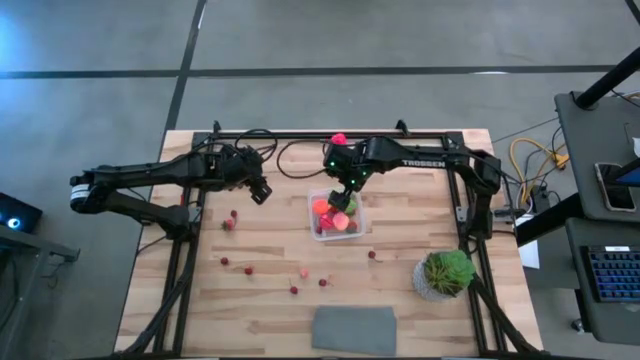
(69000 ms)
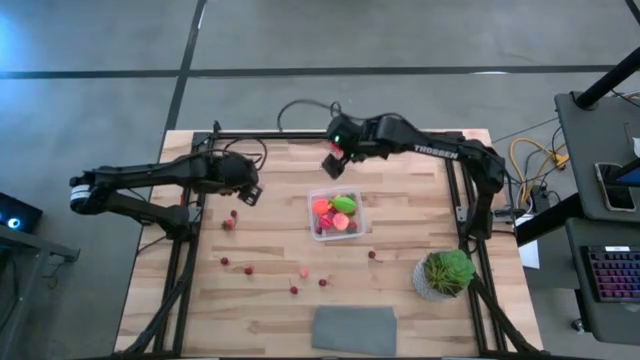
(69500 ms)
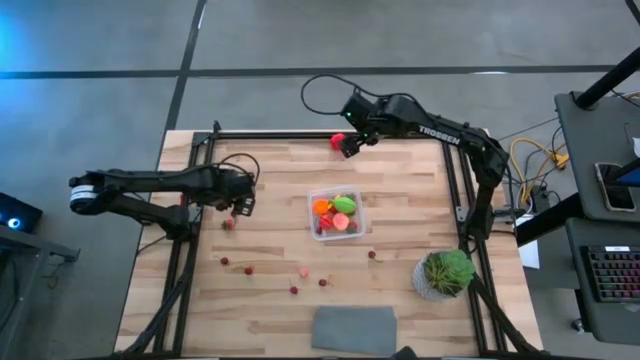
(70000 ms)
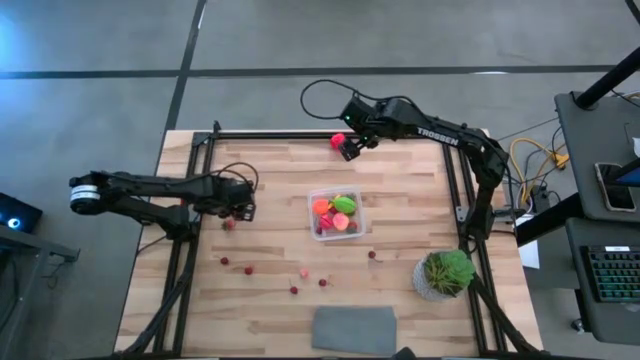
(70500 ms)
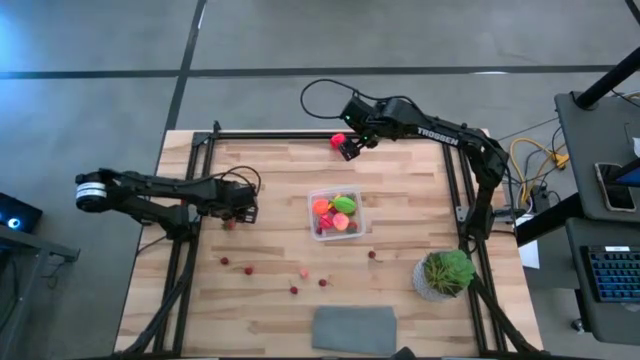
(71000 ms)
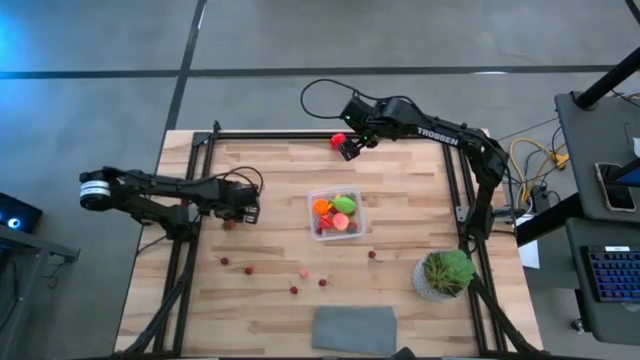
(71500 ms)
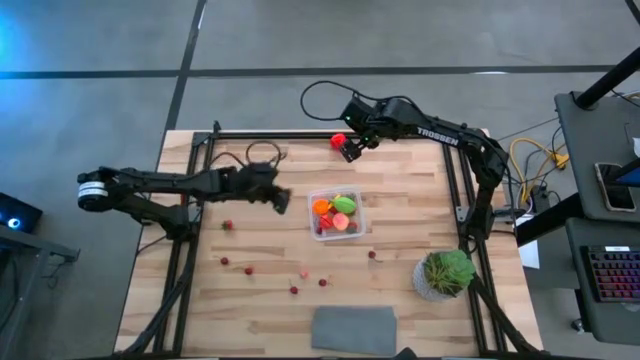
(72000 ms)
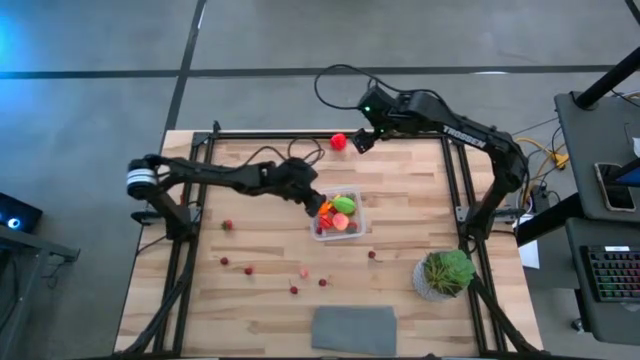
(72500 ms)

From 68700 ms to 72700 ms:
Task: Pick and placing Produce into tupperware
Put the red cherry into the transparent container

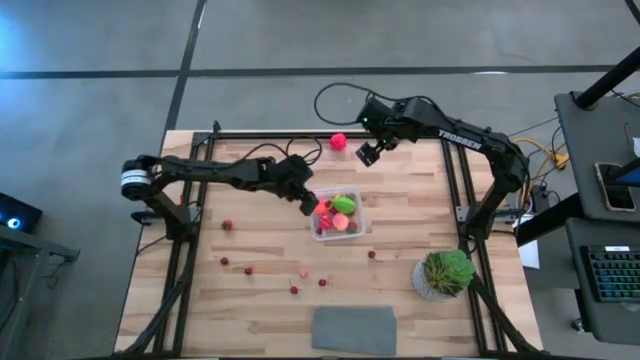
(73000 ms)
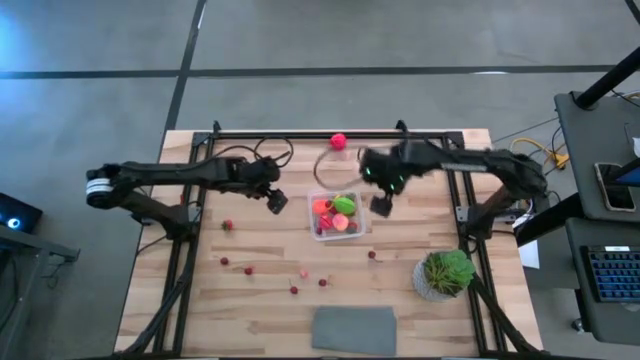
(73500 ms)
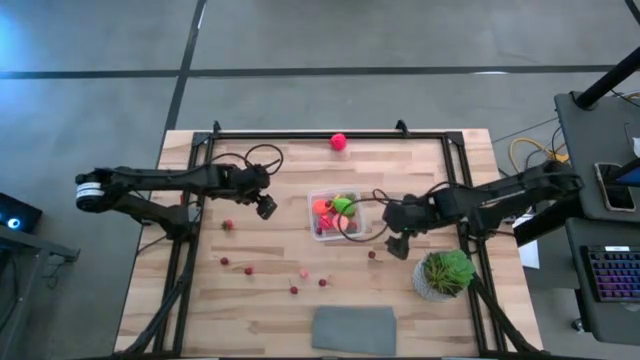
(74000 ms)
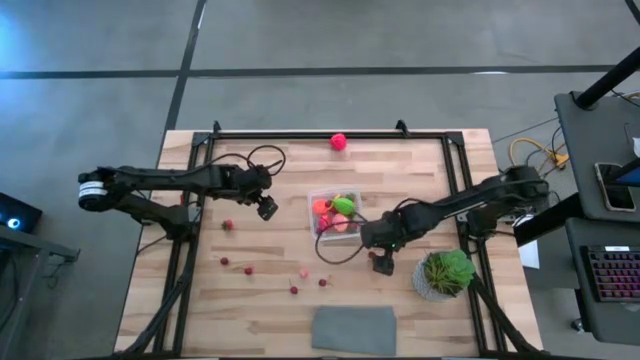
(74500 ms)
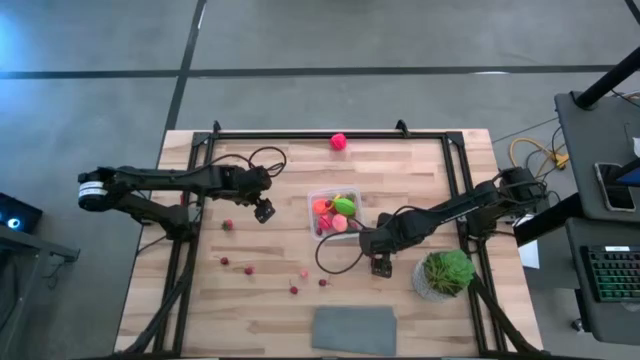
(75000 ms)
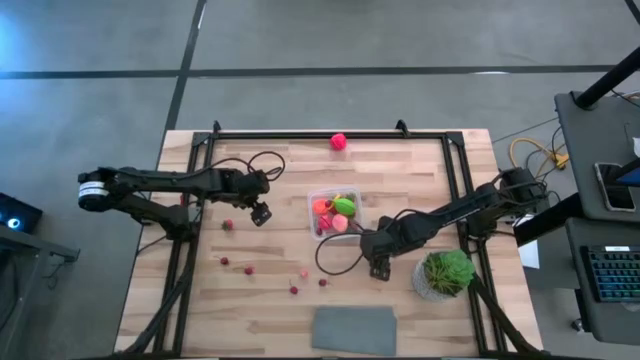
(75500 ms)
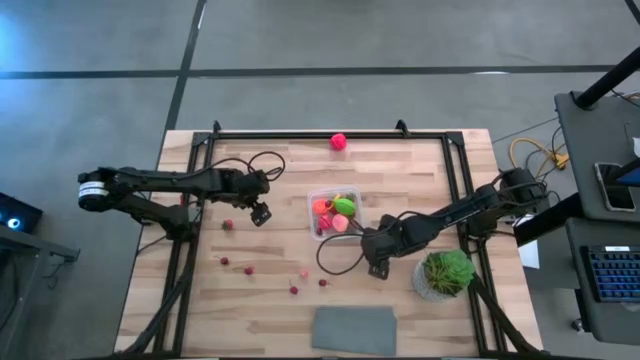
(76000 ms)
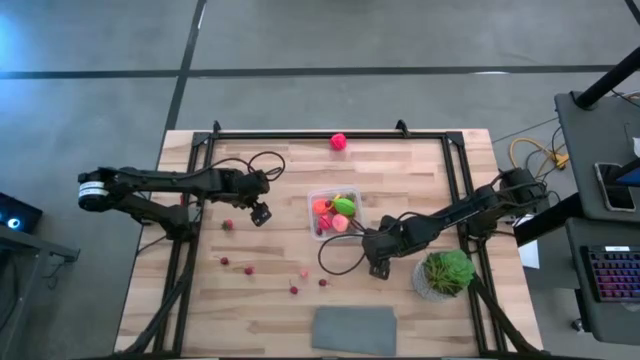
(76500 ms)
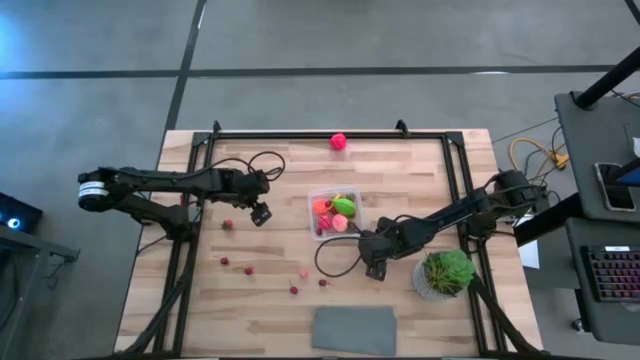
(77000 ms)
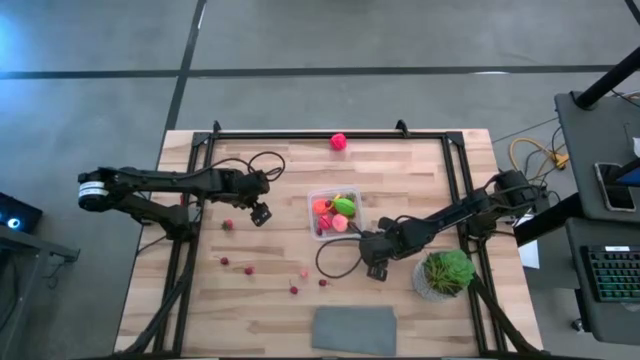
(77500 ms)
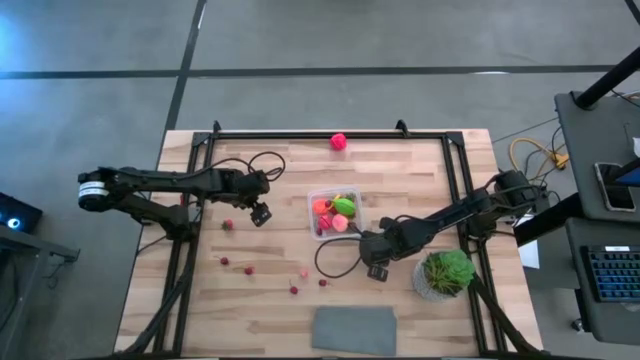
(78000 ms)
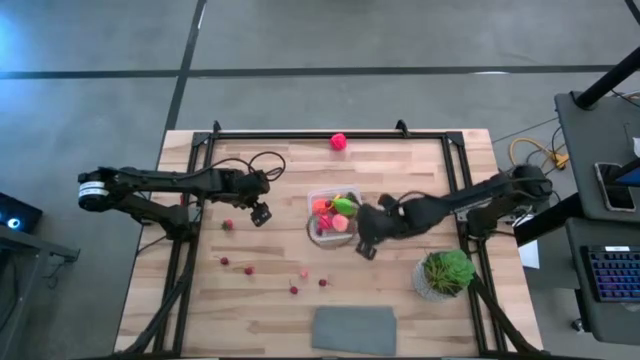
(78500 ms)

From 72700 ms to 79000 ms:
Put the red cherry into the transparent container

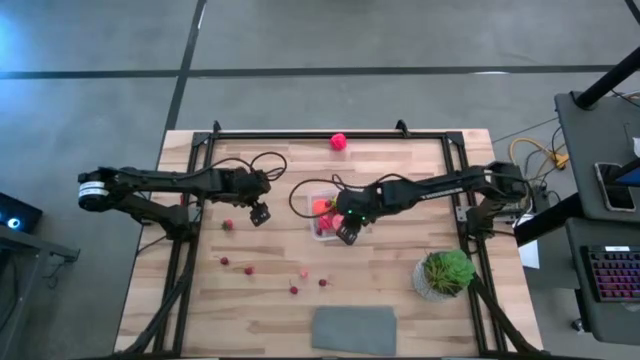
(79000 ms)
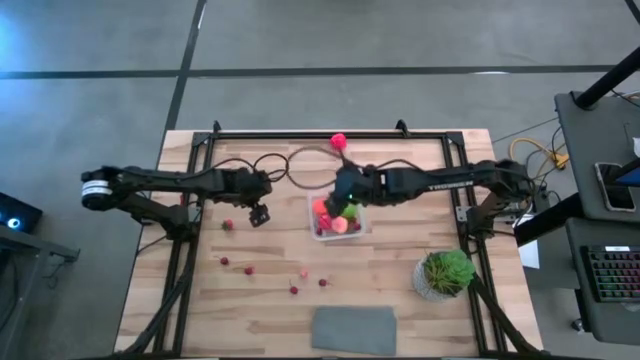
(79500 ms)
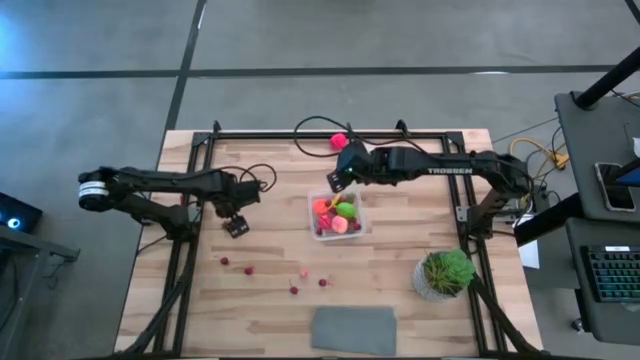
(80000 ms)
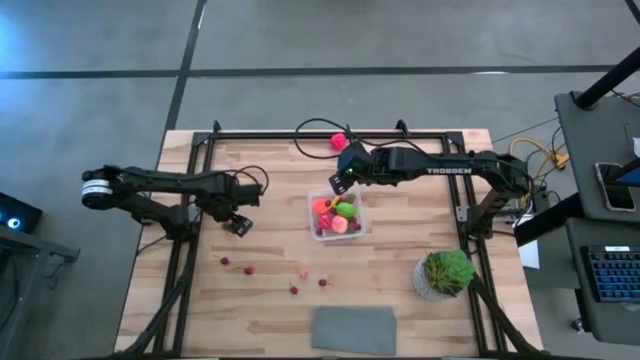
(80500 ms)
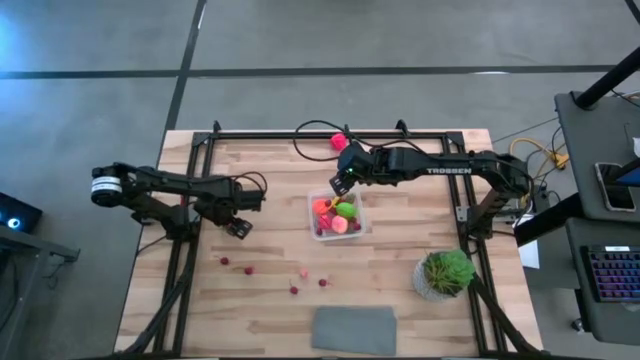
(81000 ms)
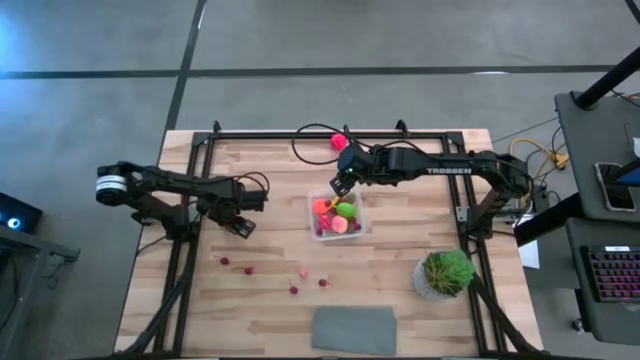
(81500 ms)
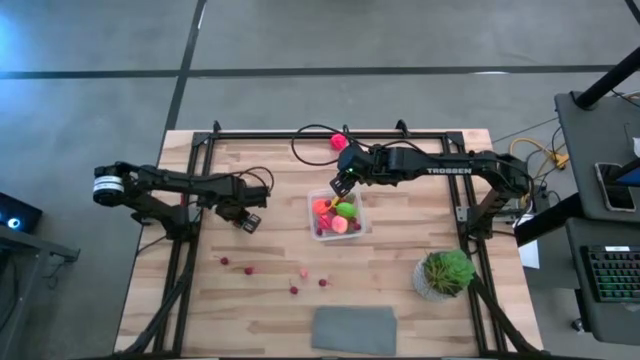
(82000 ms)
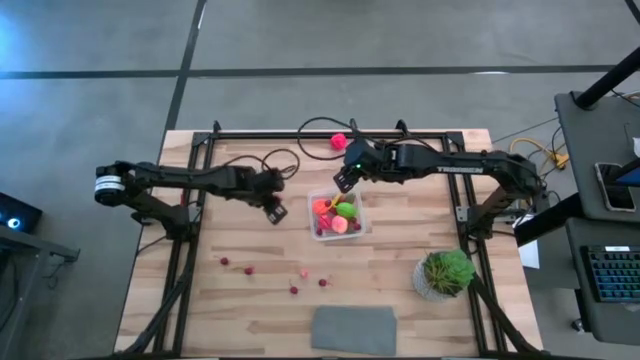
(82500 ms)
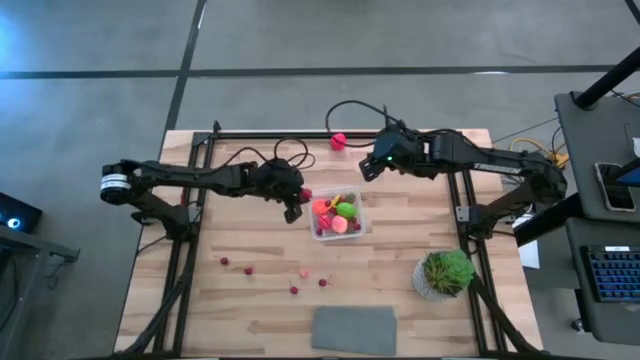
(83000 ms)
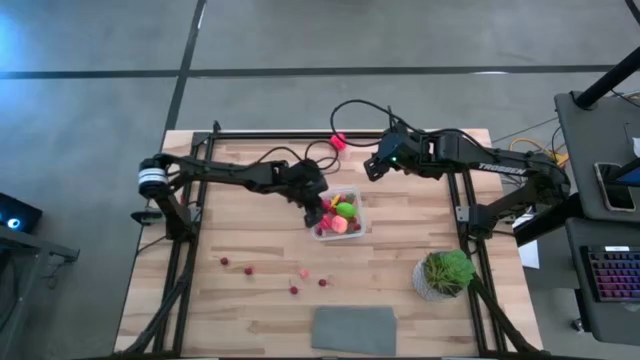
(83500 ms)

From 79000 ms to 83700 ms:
Put the red strawberry into the transparent container

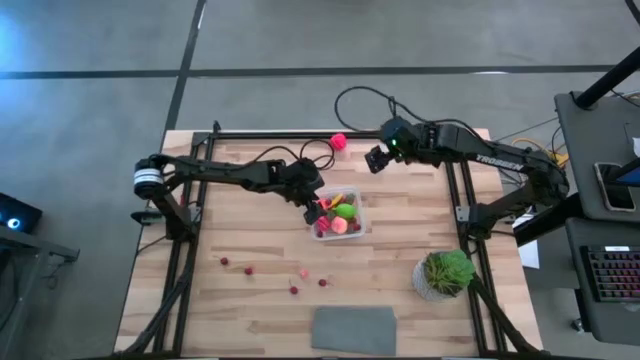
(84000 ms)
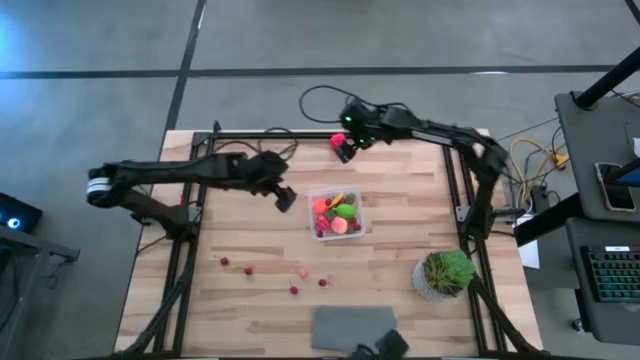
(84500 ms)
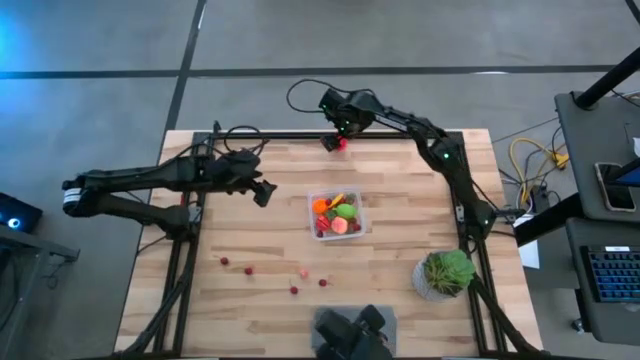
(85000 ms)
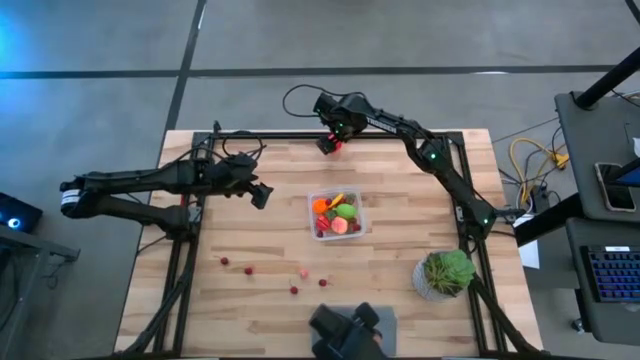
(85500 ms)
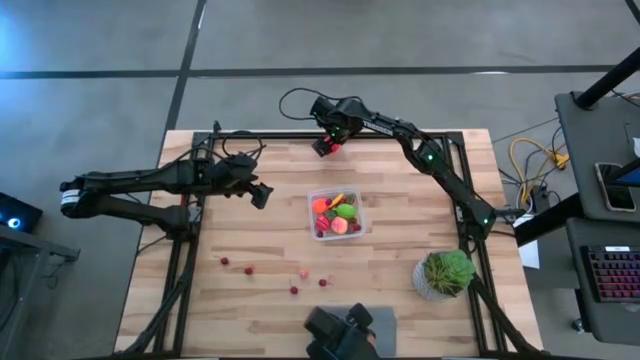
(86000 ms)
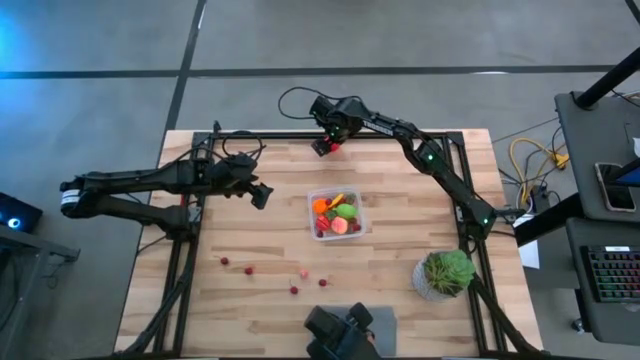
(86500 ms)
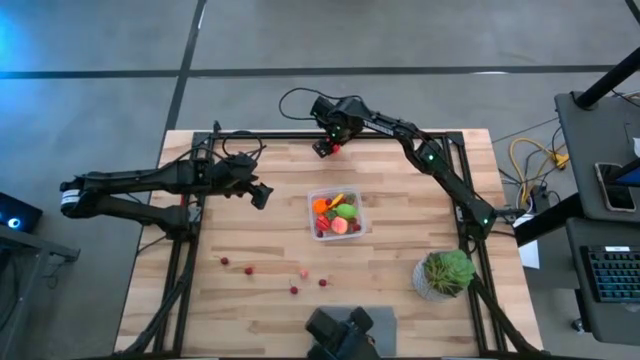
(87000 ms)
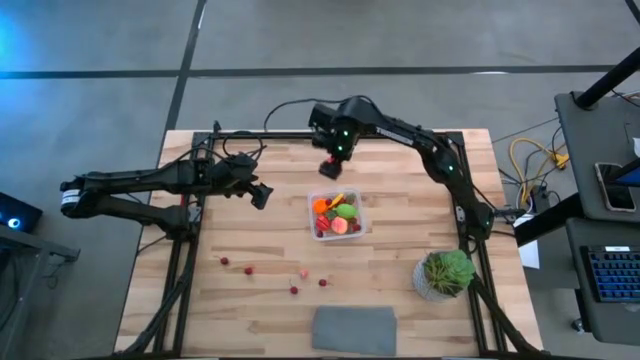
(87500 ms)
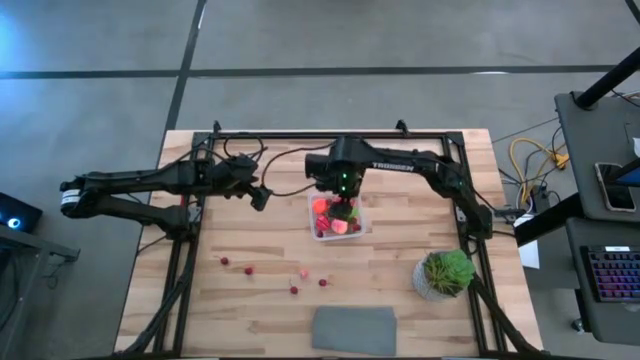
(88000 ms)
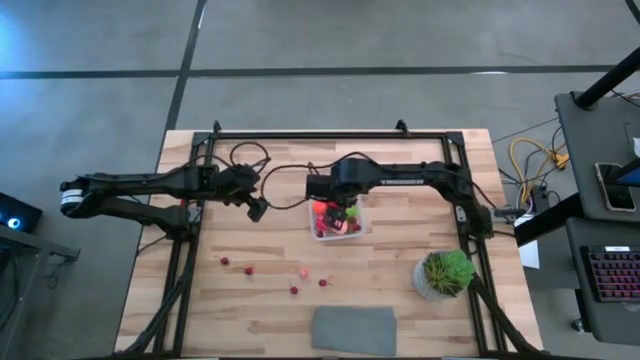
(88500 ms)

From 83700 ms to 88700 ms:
Put the red apple into the transparent container
